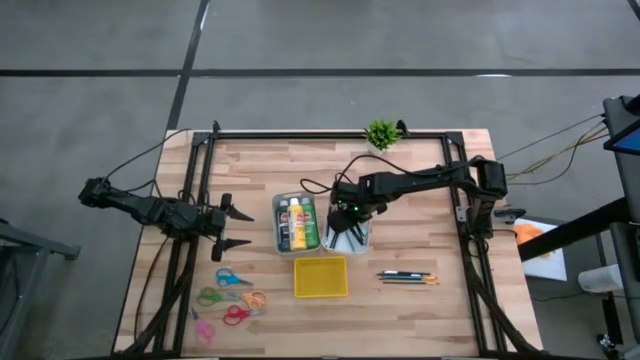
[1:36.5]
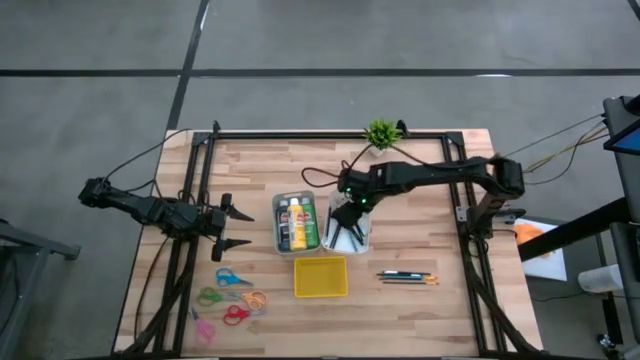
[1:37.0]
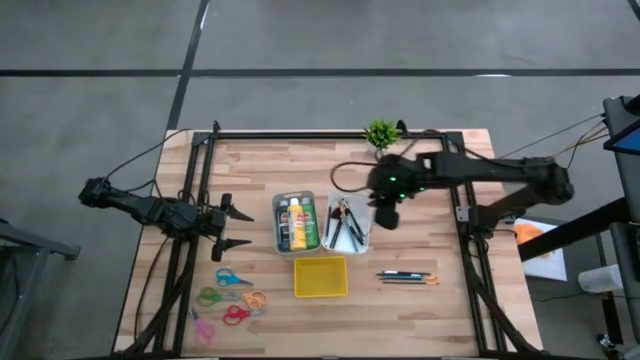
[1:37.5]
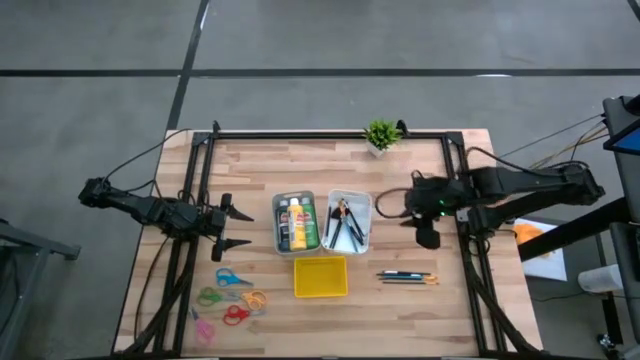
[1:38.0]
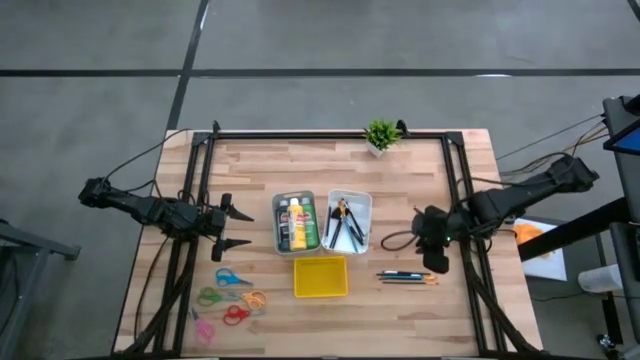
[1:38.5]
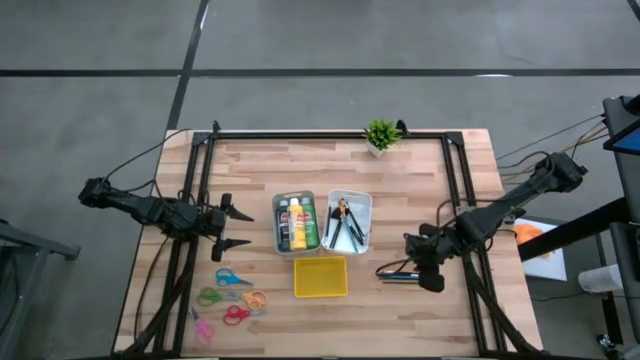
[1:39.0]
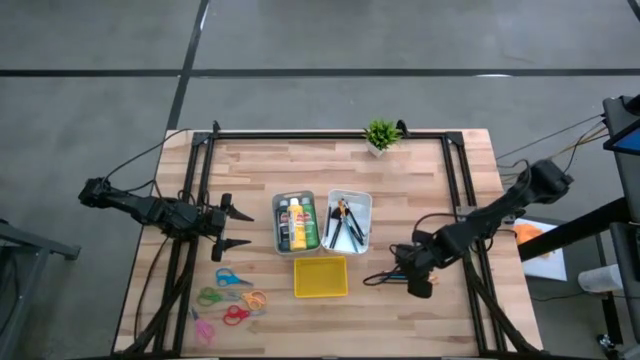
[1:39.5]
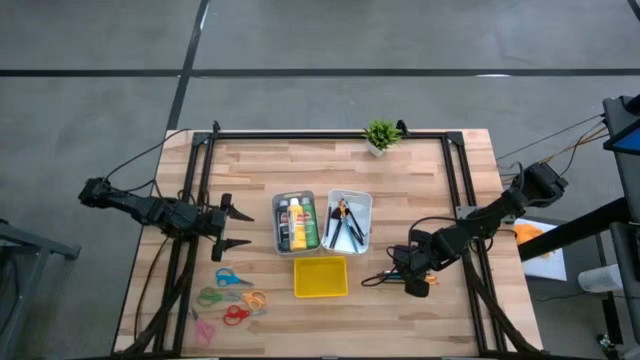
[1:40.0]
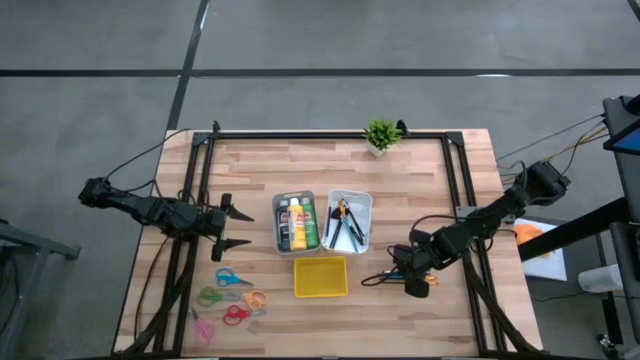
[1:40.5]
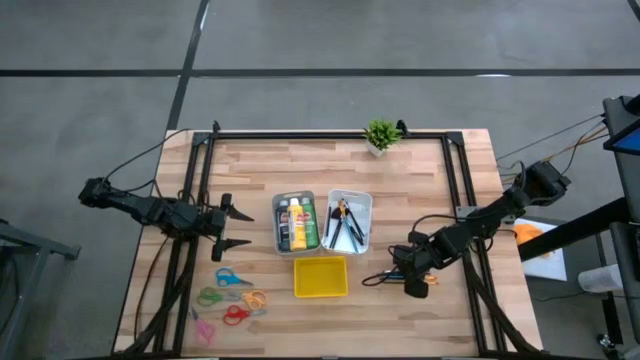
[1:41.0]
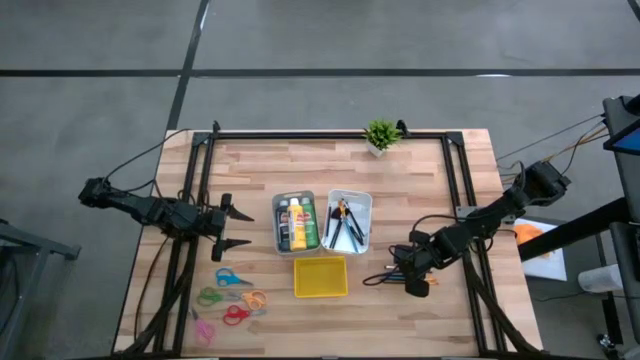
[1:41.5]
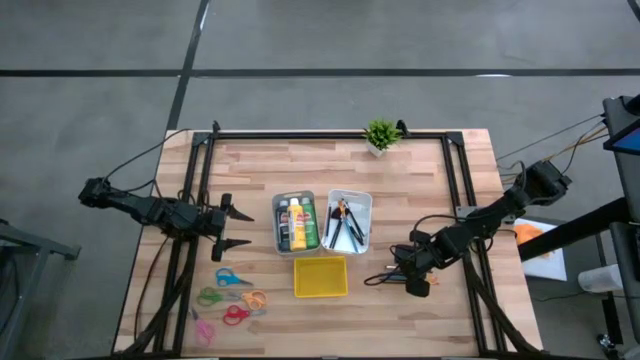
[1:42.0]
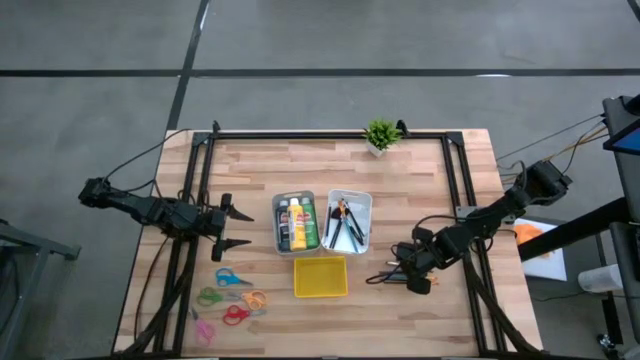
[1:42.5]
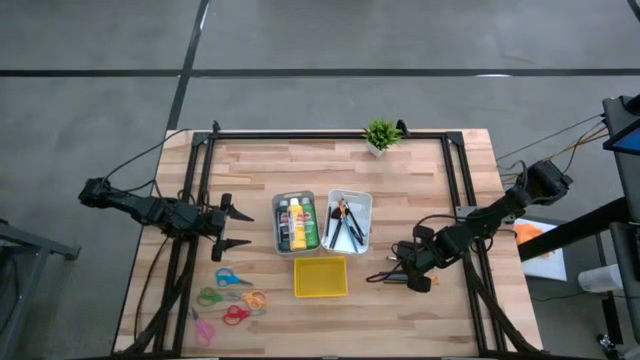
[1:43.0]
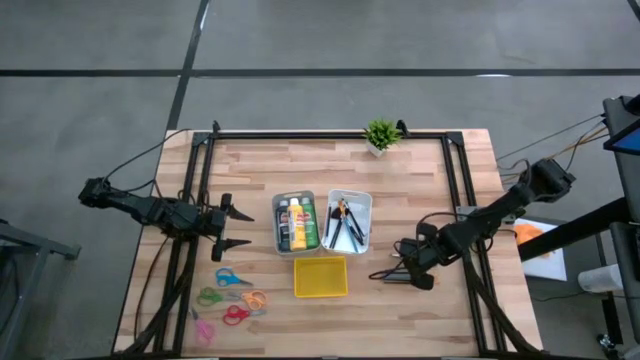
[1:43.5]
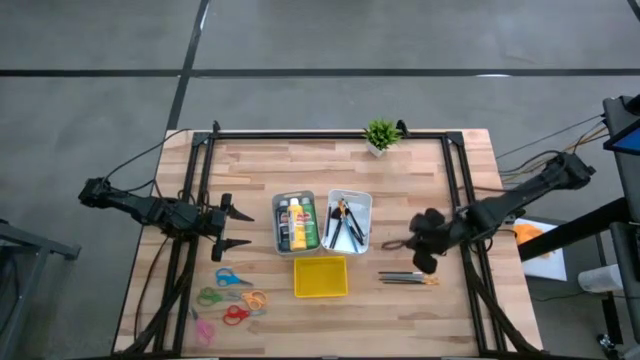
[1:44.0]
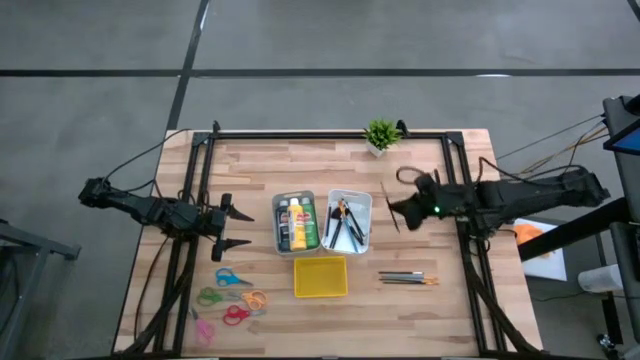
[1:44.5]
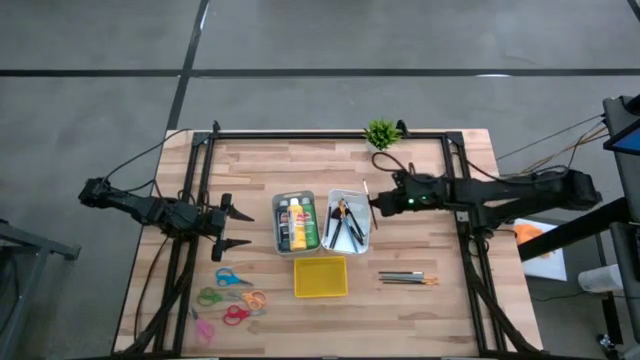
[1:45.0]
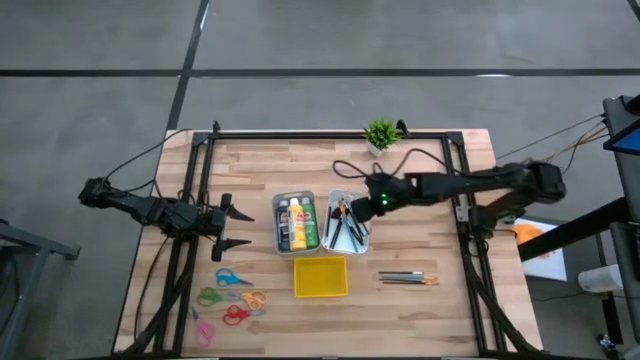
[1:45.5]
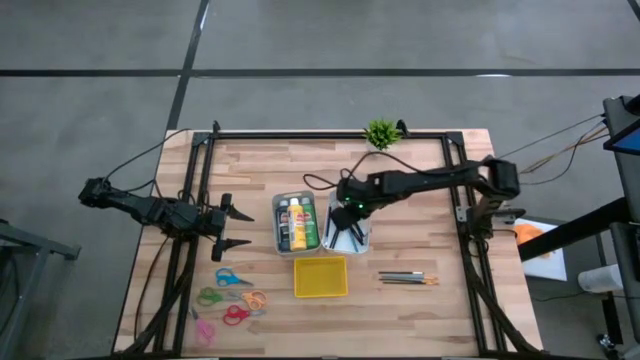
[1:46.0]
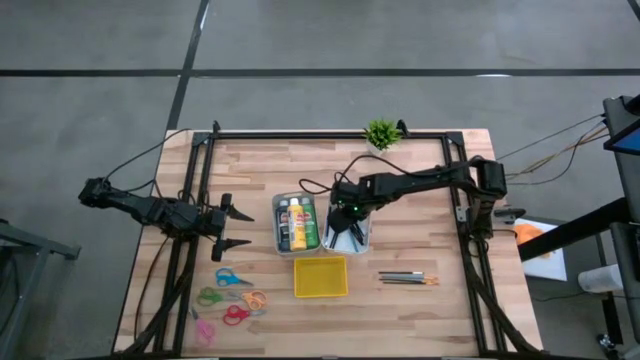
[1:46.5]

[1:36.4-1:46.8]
Task: Pick & Place Paint Supplies
Put the silver paint brush into the white bin

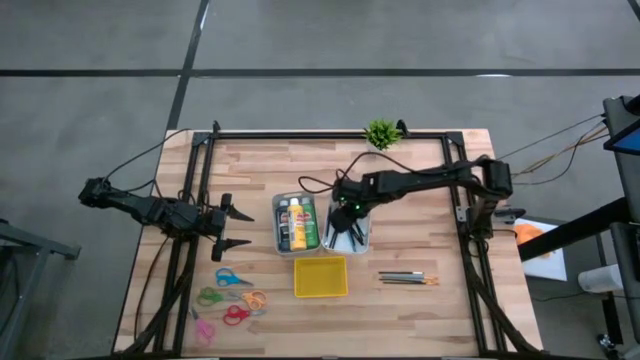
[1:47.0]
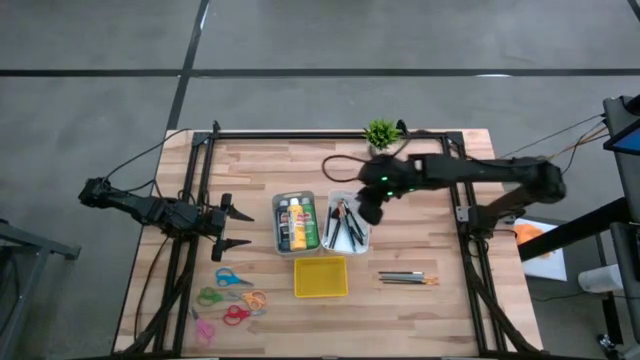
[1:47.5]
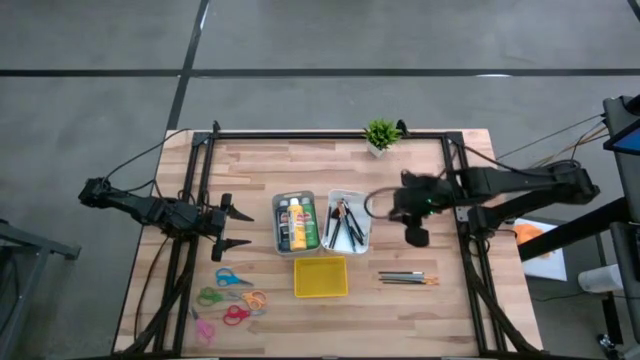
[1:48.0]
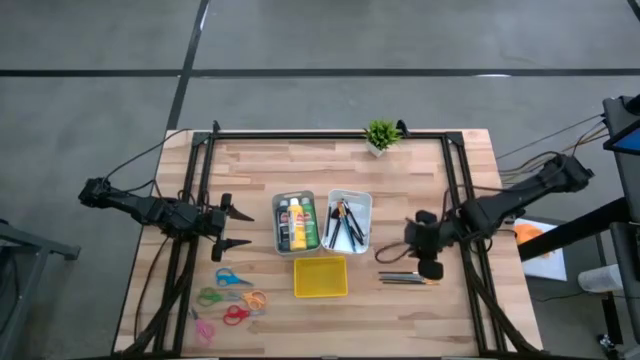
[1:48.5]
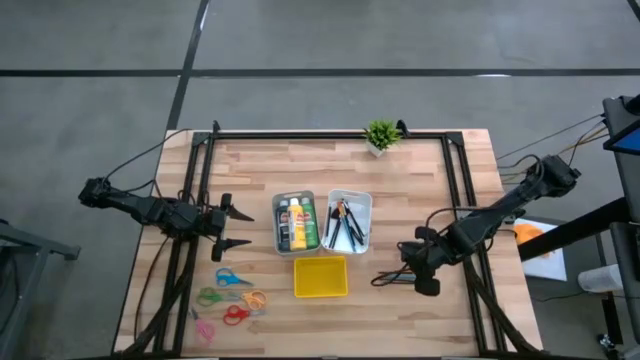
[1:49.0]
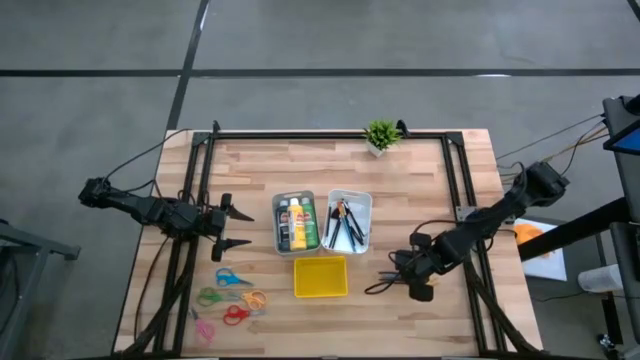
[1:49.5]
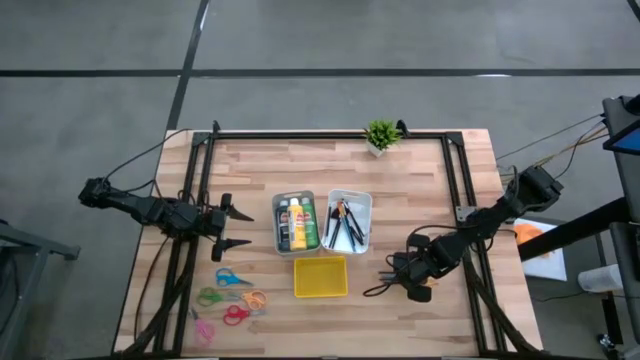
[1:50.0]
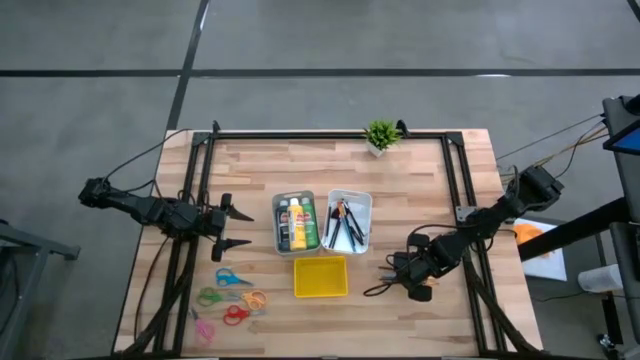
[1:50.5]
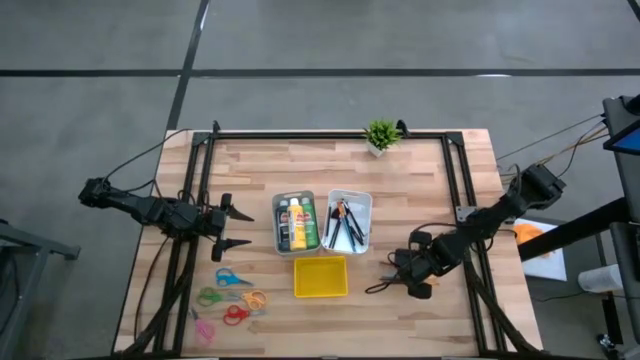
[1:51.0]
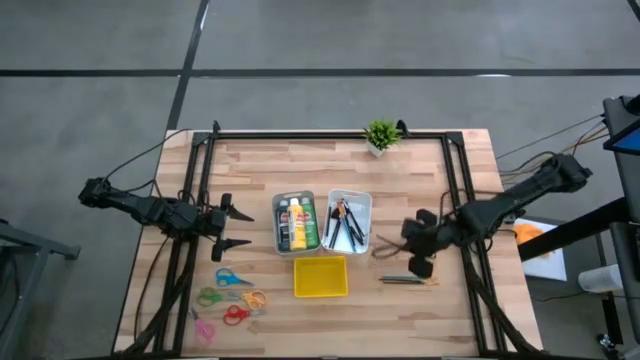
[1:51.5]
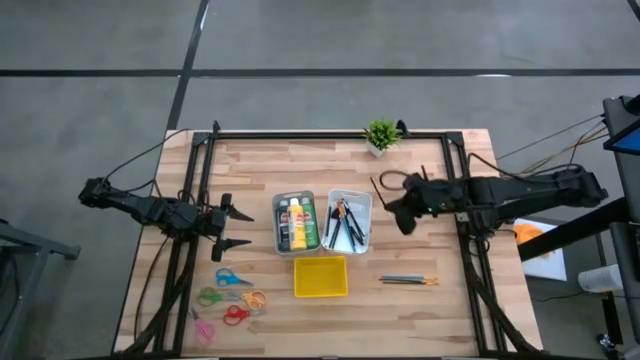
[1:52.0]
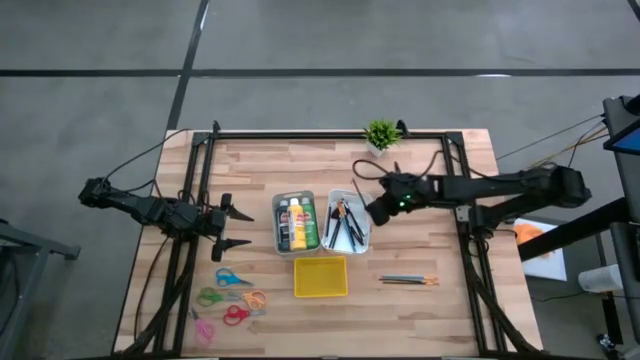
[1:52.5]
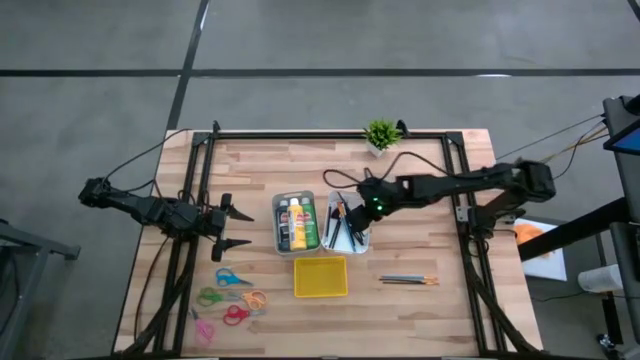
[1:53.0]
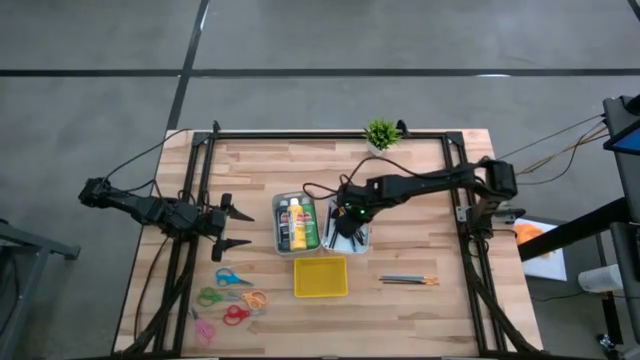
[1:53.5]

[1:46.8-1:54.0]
Put the silver paint brush into the white bin

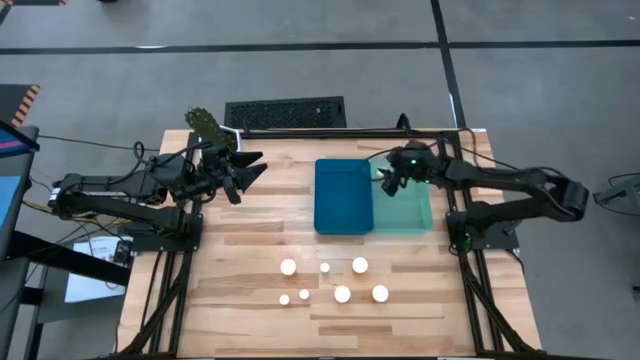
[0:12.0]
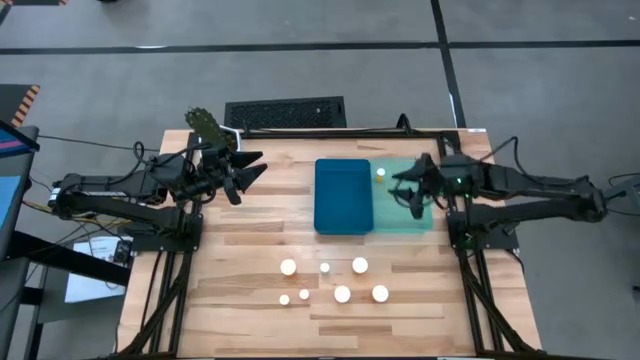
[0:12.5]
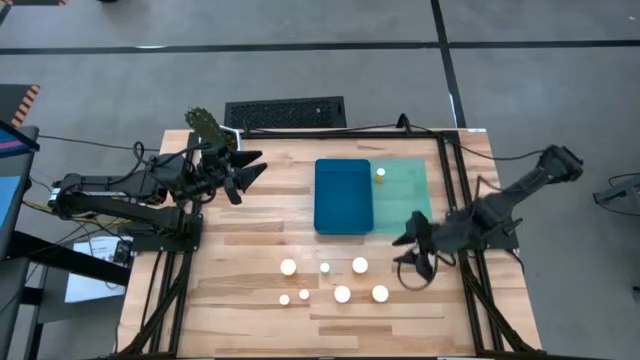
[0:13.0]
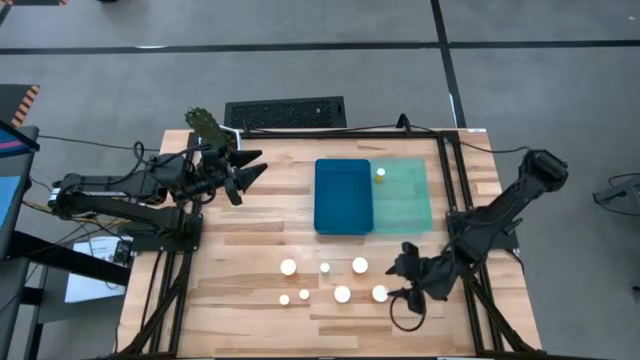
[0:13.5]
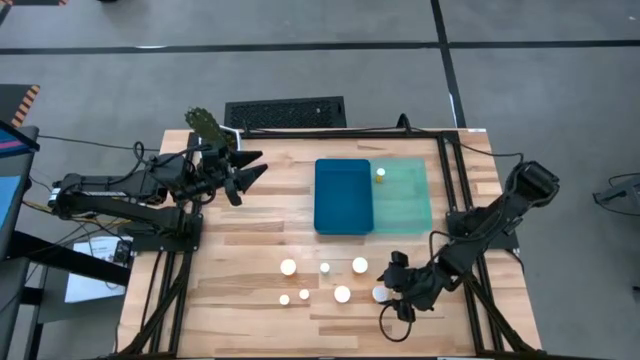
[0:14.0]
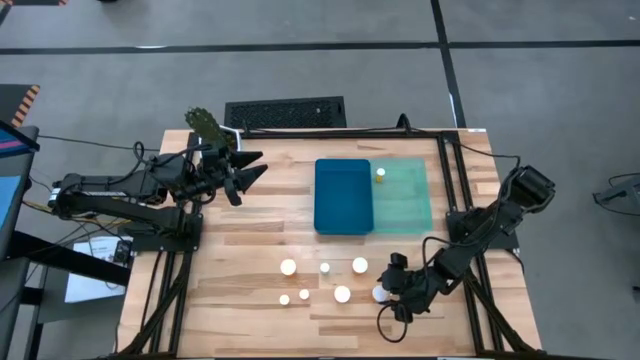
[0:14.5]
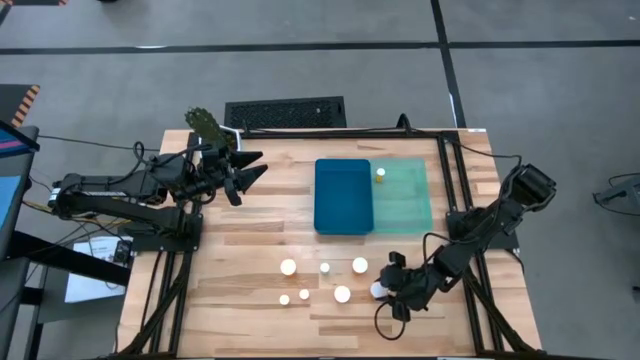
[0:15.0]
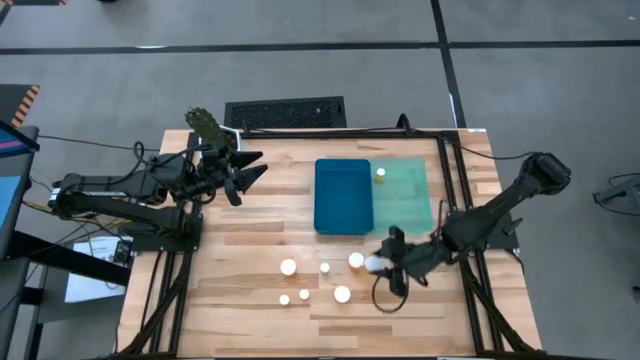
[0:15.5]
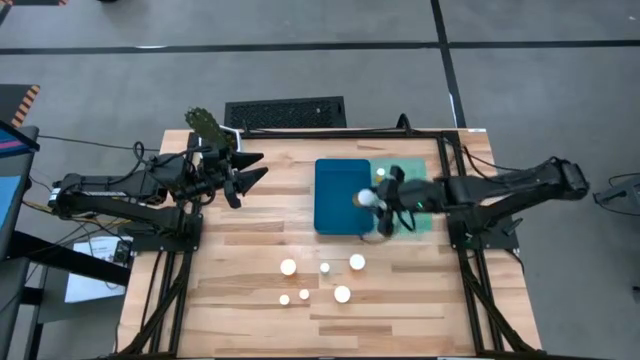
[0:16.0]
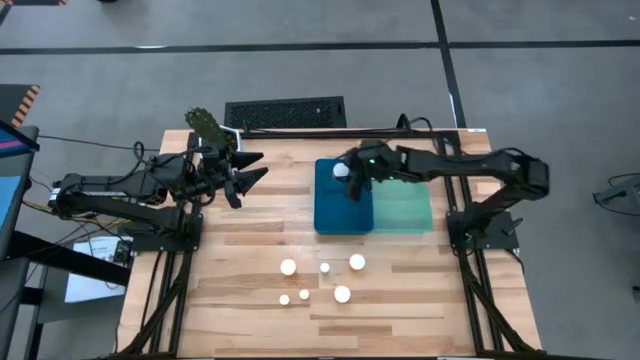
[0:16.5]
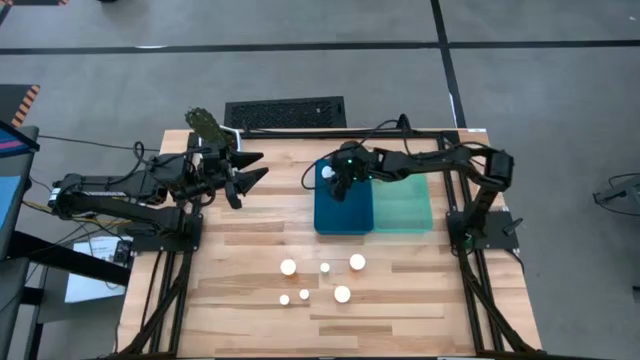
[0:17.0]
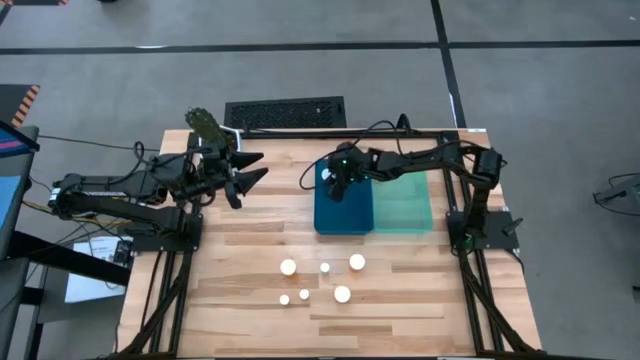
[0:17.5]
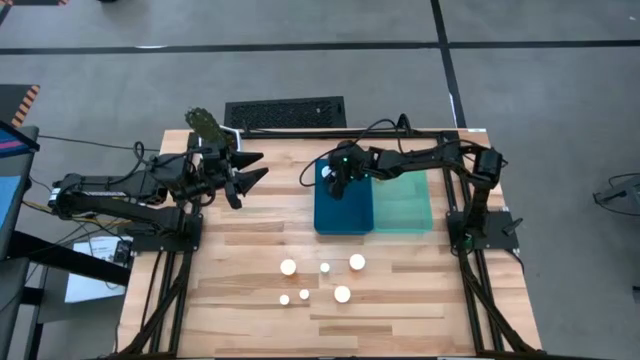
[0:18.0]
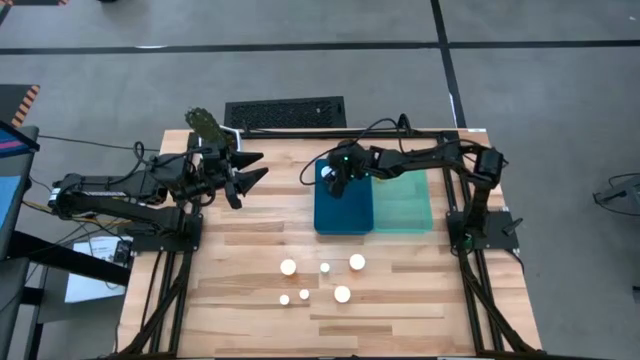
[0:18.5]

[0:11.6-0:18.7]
Task: Pick and place medicine bottles into bin by pill shape (circle, oval)
Put the large orange pill bottle into the blue bin
